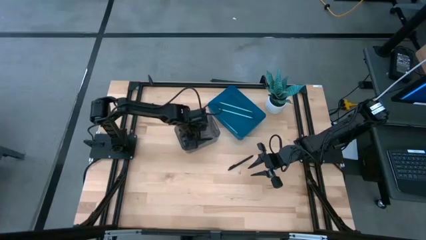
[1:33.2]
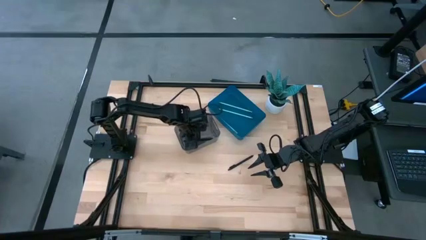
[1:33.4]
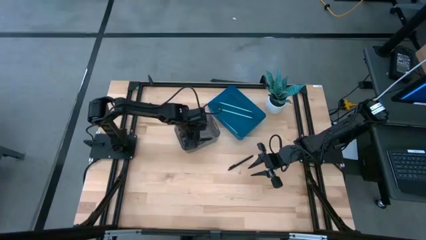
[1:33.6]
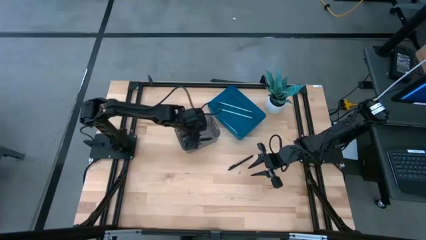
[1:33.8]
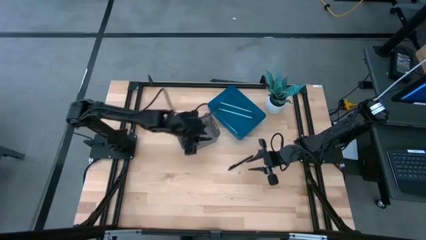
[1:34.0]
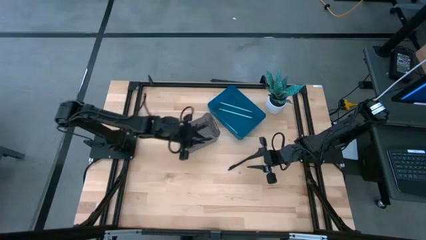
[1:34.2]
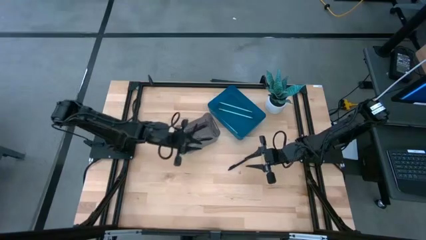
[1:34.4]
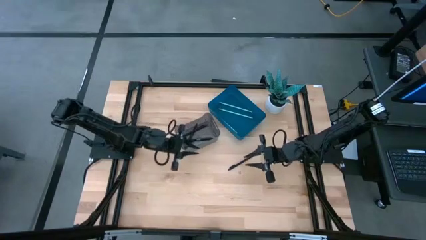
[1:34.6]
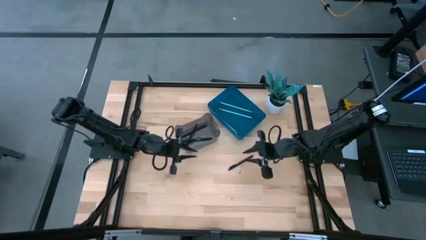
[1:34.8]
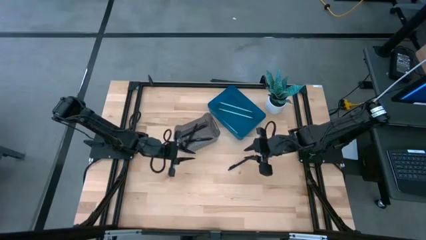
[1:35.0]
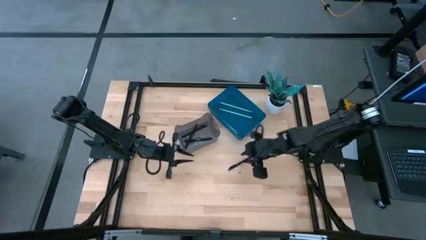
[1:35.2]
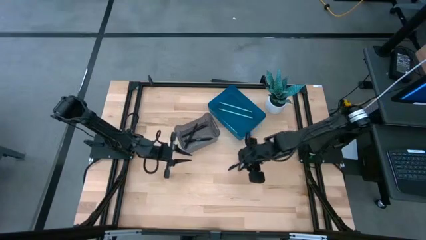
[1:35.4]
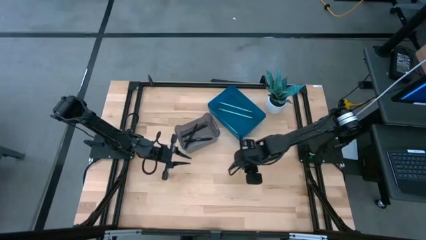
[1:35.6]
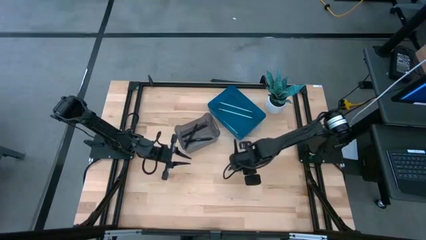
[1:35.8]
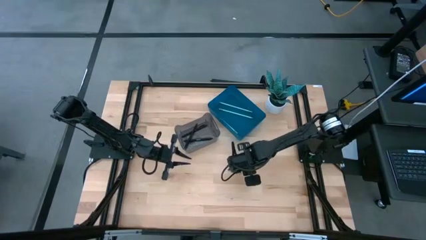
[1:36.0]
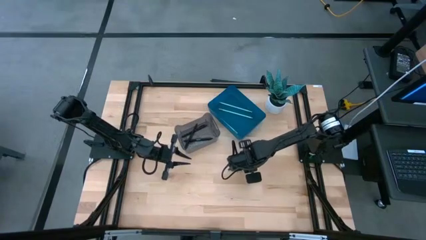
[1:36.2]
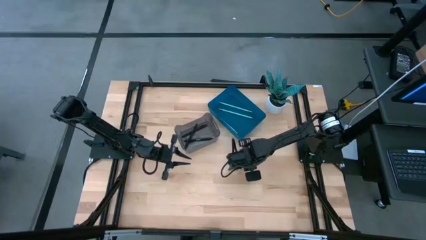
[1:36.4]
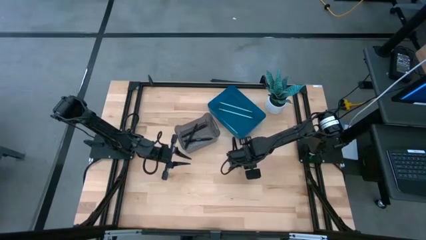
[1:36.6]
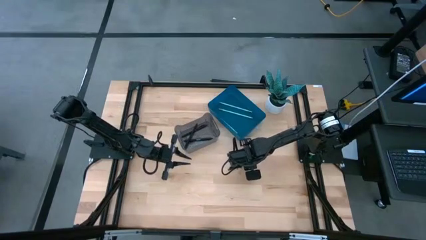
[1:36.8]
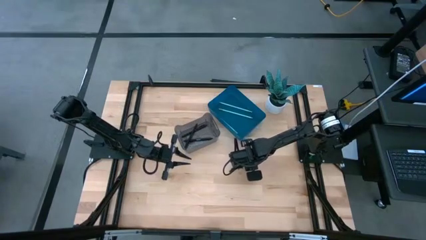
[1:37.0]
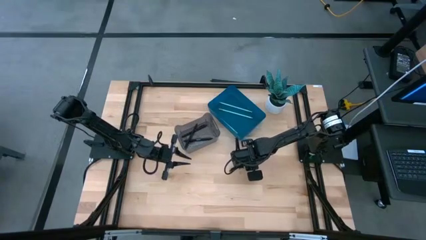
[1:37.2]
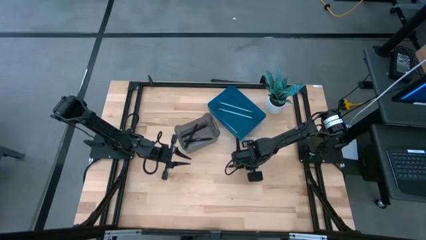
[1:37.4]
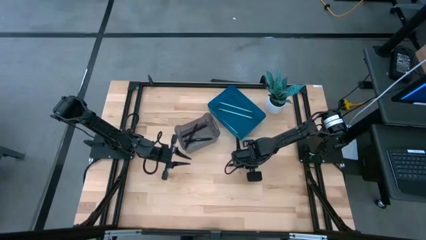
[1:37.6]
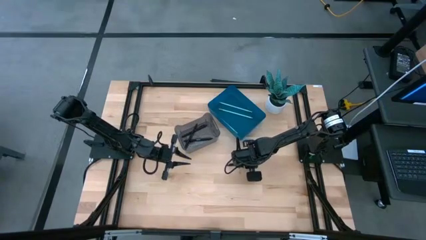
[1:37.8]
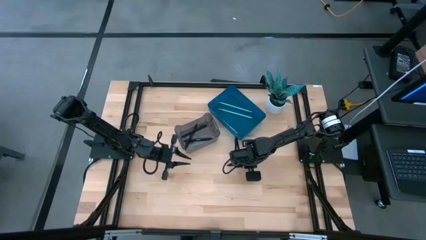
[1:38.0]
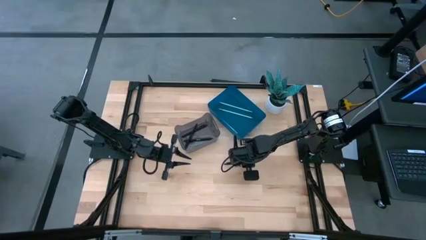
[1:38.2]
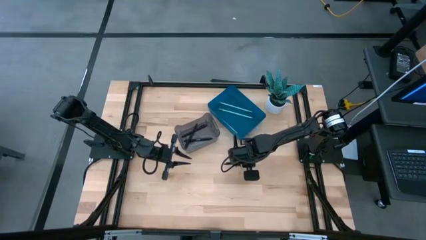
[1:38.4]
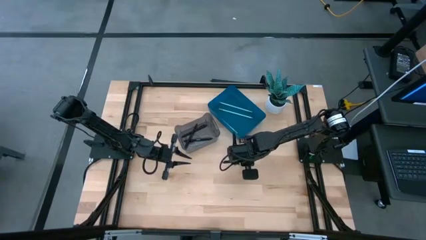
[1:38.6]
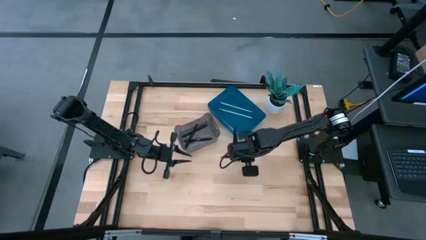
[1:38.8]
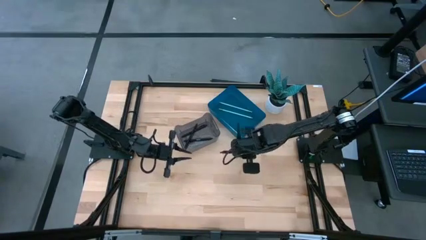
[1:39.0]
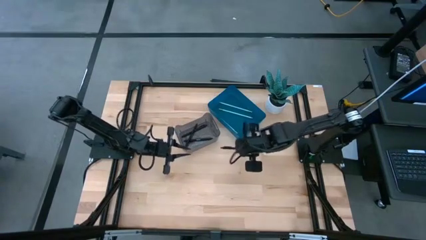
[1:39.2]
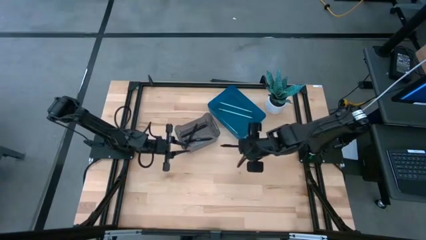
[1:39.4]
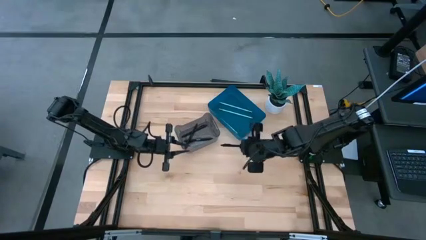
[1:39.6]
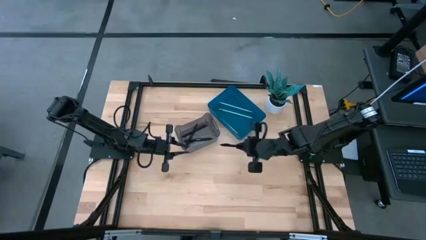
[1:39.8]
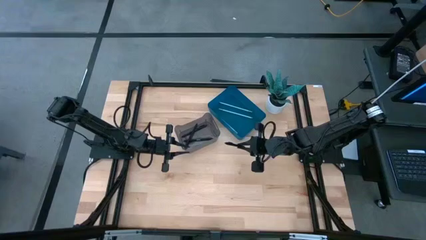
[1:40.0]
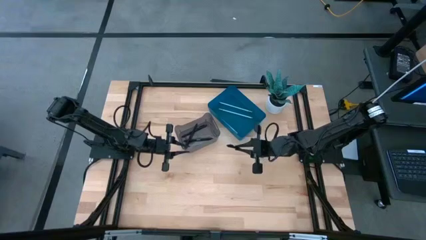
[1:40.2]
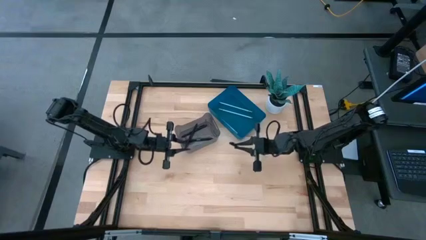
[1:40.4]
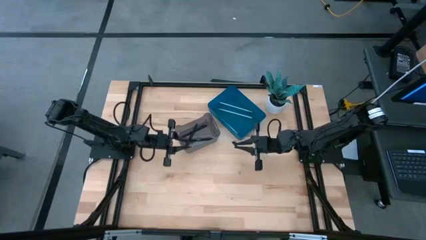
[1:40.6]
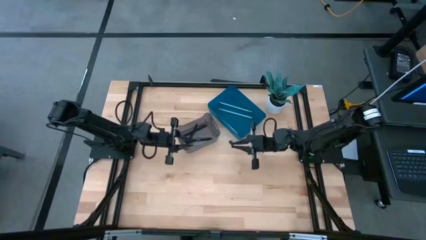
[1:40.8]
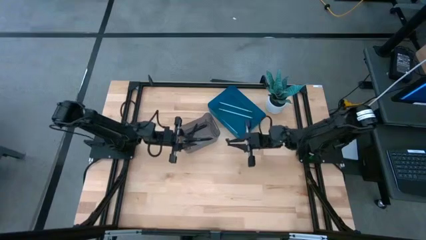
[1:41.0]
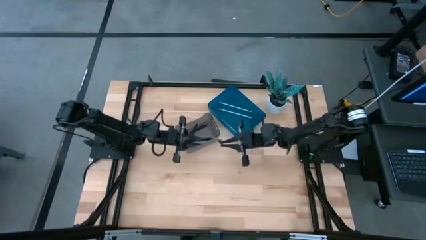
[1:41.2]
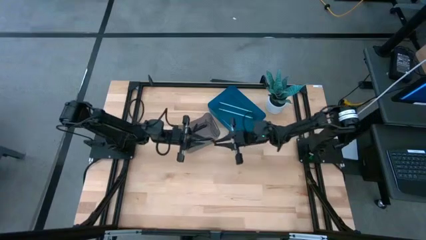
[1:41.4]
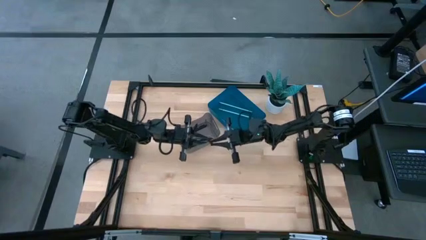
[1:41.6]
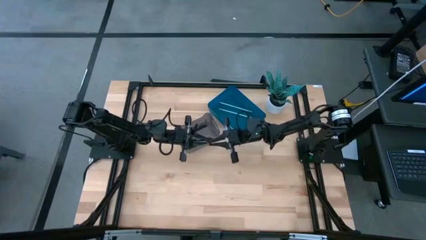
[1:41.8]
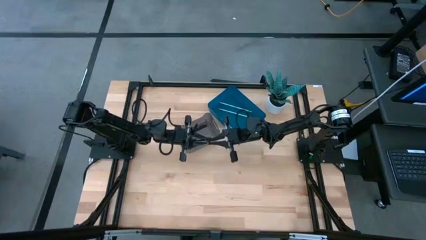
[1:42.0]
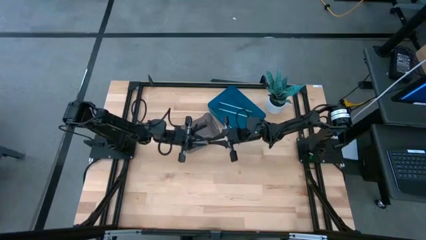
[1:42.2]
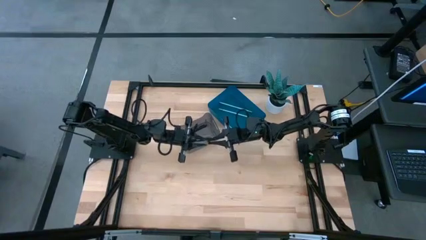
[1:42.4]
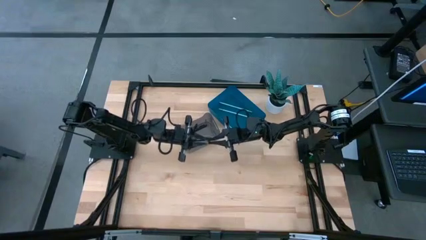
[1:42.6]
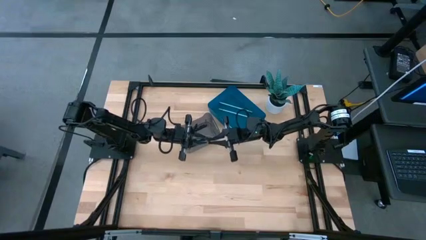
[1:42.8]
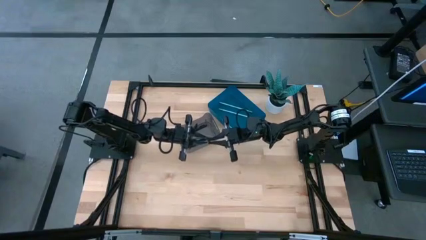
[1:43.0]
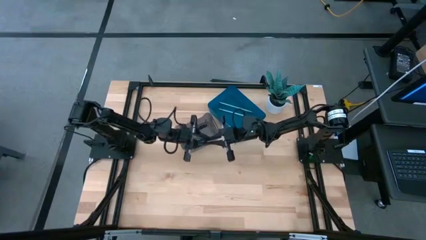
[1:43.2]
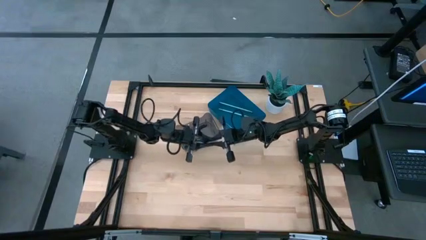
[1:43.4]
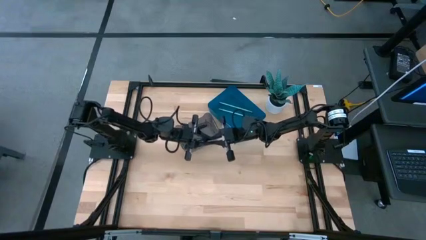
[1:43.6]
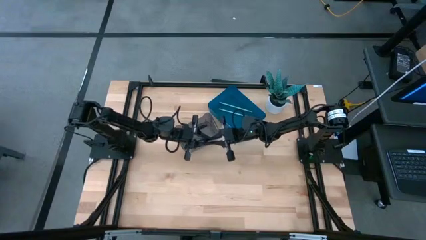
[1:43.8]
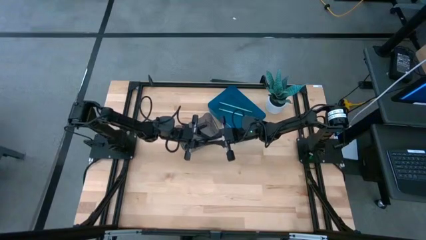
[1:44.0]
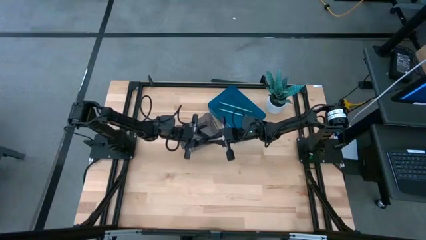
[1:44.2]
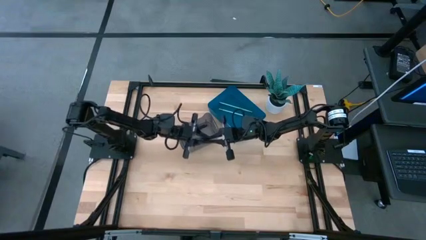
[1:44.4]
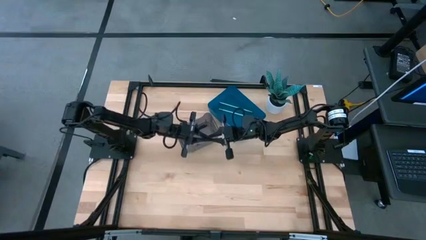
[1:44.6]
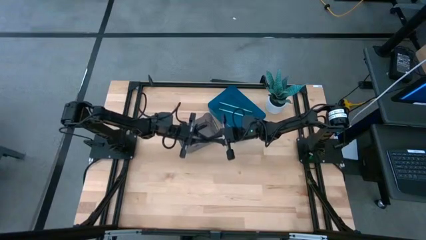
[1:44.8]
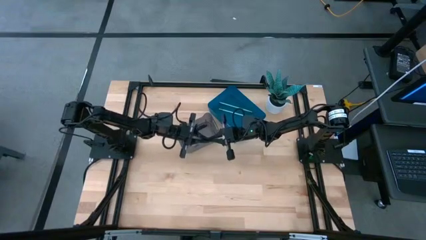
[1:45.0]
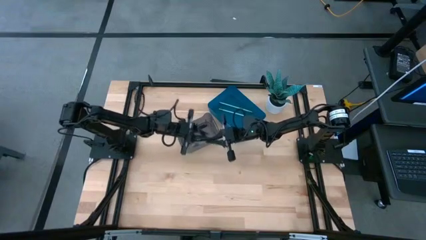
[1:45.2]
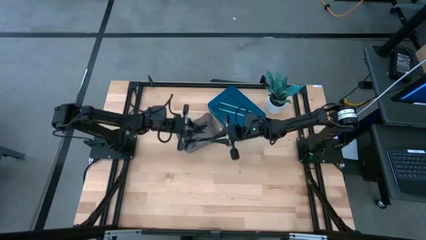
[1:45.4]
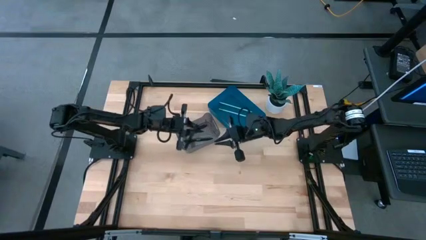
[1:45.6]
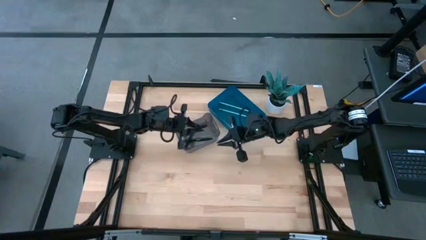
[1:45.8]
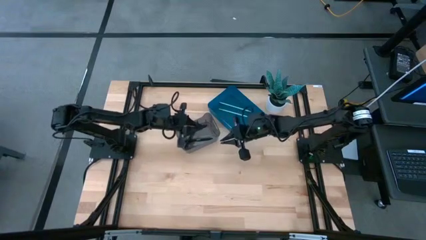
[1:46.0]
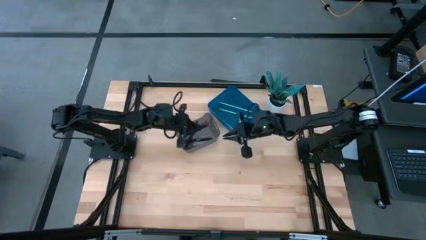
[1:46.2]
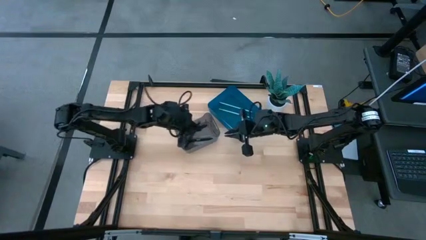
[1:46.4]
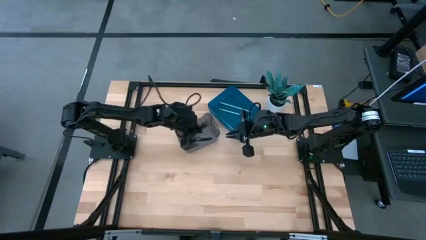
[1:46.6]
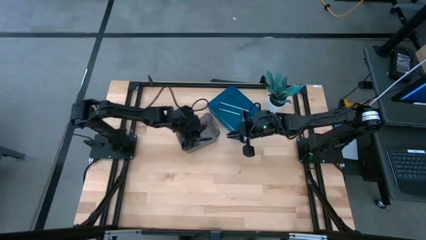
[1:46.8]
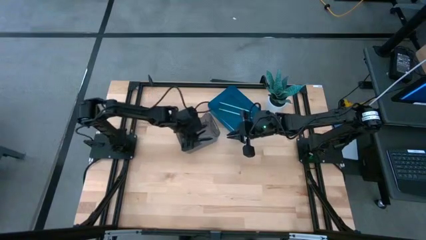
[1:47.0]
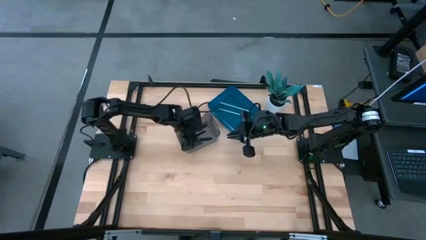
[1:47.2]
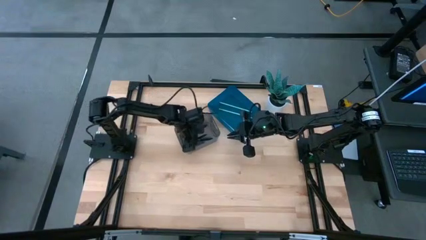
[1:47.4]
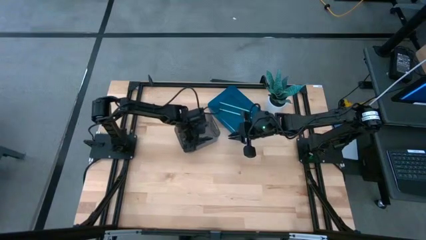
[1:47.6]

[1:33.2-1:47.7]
Task: Sort pens & pencils
Put the black pen into the black bin

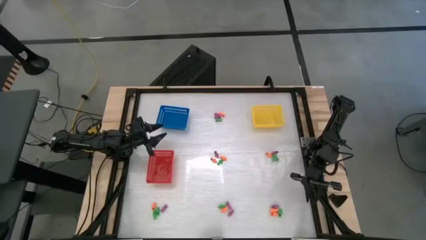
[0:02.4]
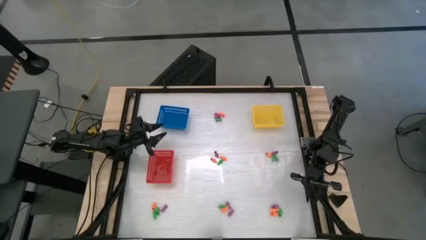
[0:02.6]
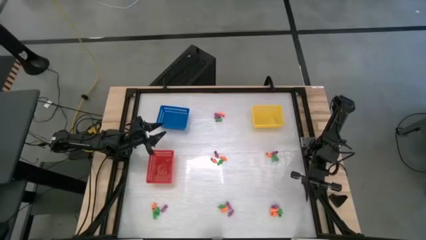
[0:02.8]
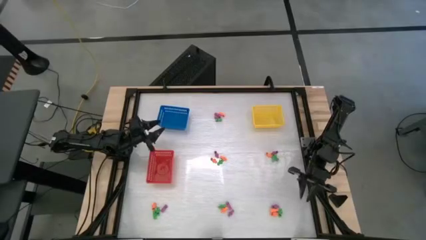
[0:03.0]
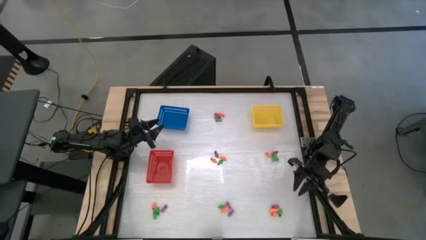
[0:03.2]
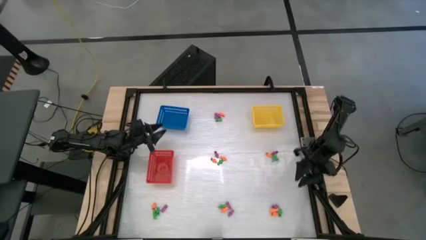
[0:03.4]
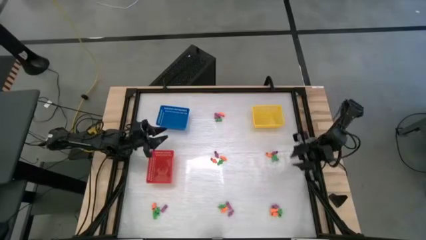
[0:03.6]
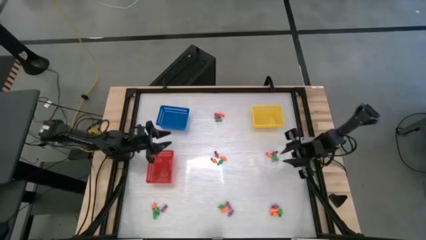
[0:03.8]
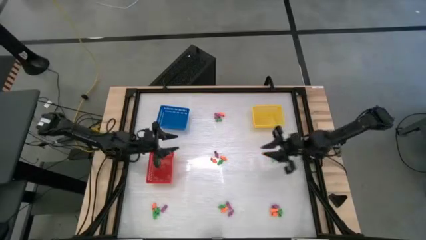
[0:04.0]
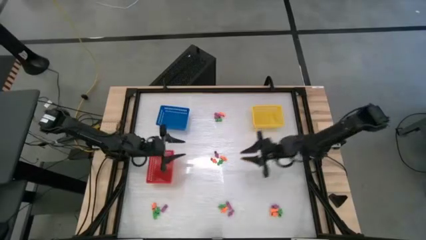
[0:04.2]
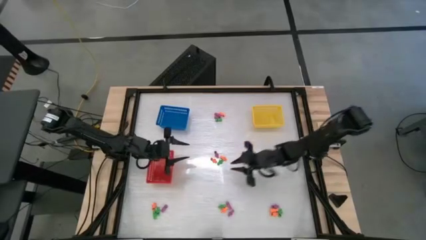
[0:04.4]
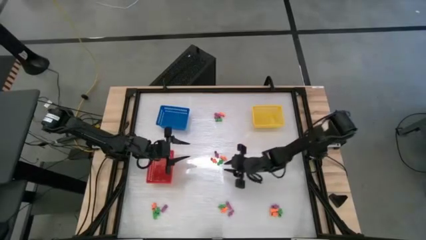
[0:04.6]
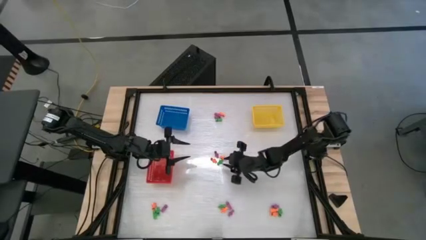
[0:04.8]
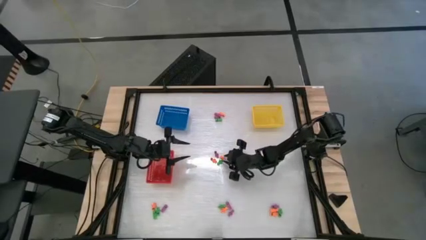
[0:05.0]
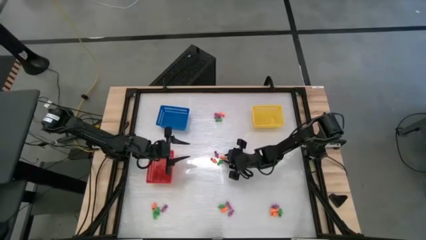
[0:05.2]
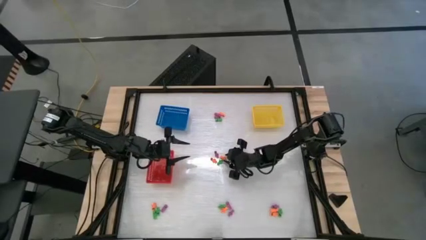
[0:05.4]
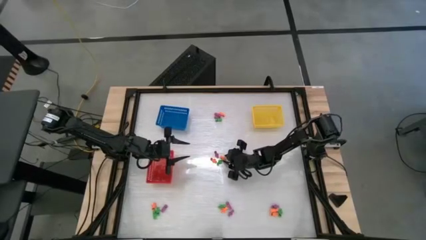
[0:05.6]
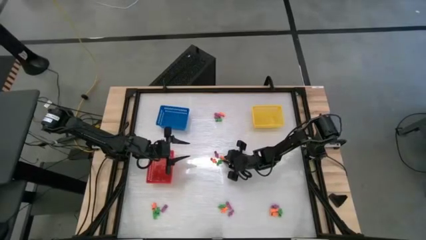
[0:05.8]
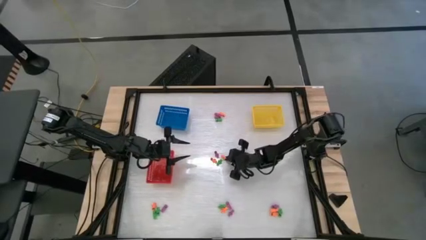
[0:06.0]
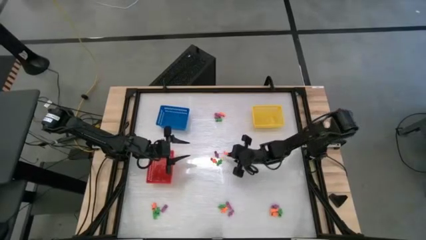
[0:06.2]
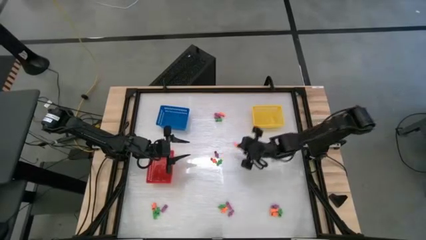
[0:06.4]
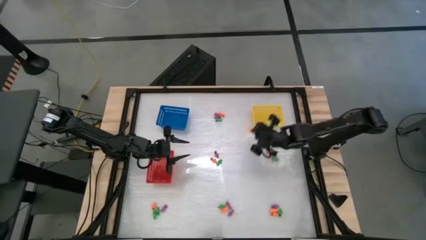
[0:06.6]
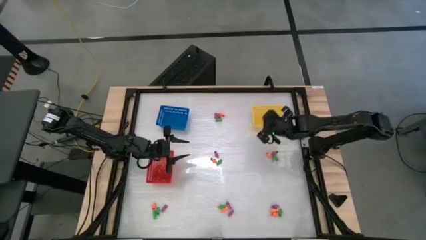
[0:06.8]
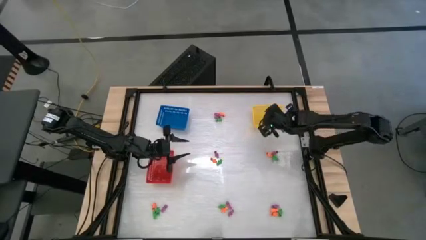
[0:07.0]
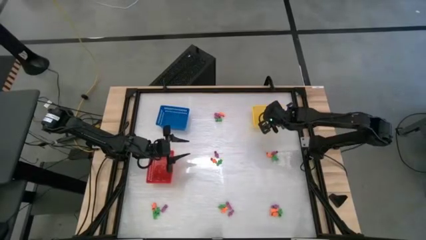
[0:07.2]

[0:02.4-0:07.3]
Task: Sort Halloween decoration
Put the orange skeleton toy into the yellow bin
